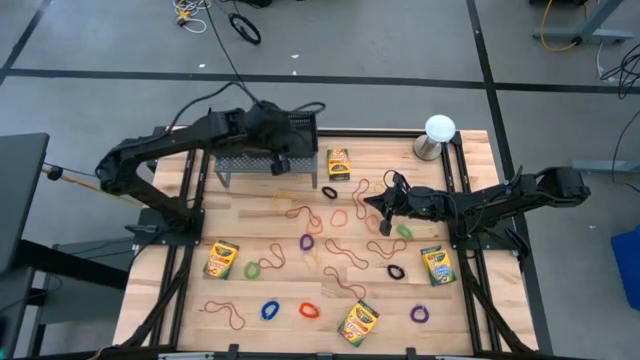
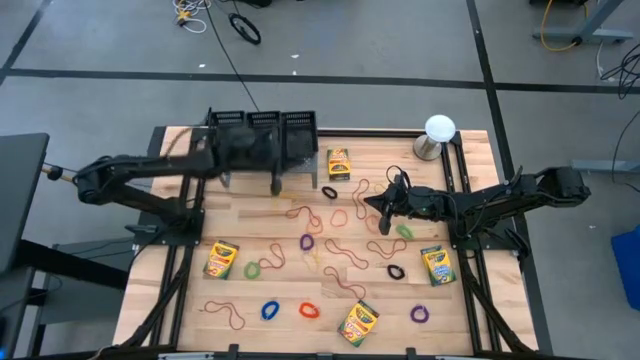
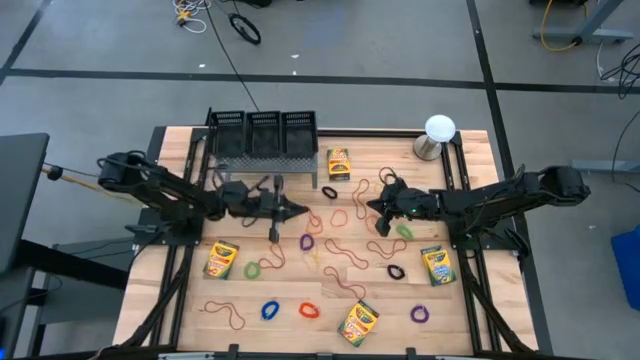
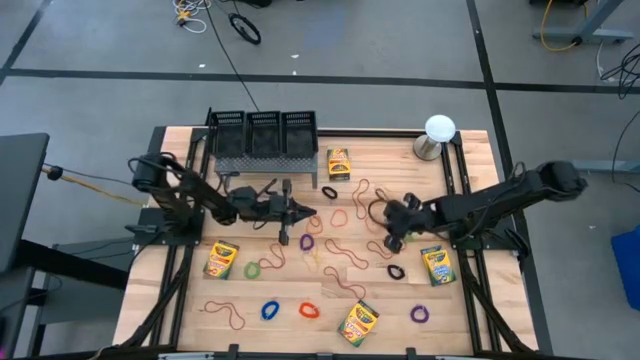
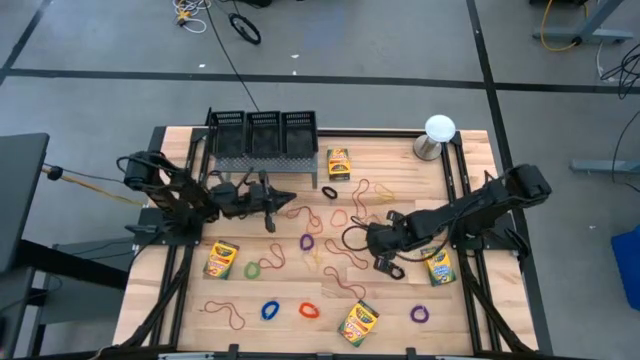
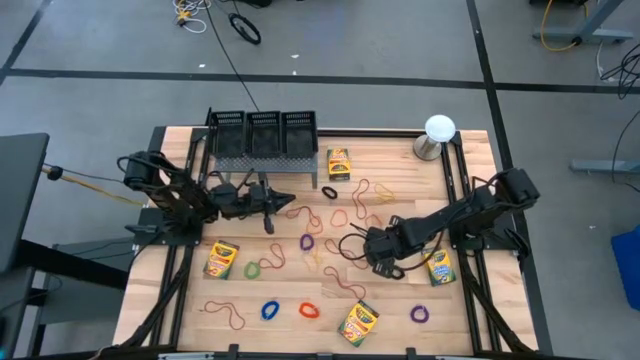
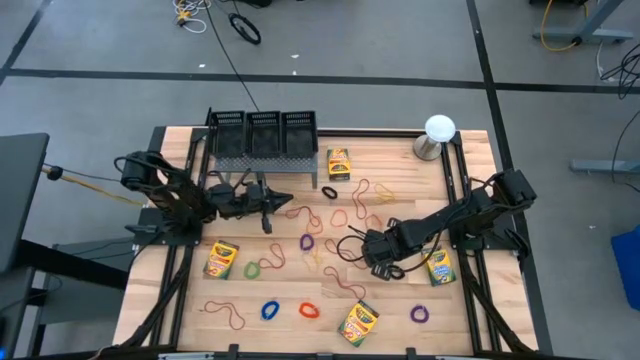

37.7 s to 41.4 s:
Task: Pick & Place Office Desk Supplies
Put the red rubber band into the right black bin

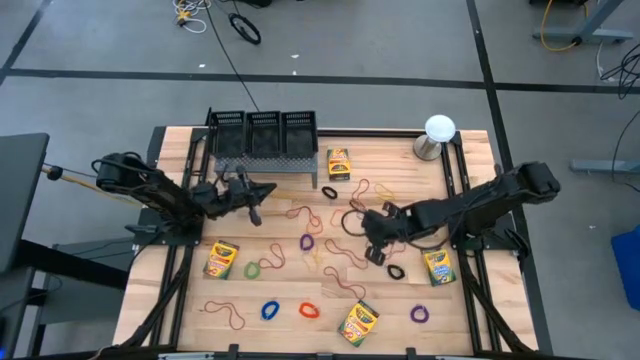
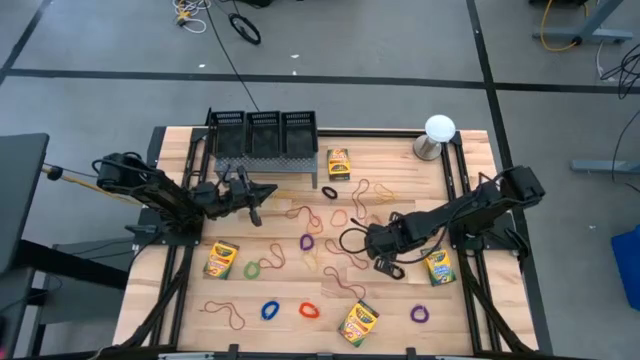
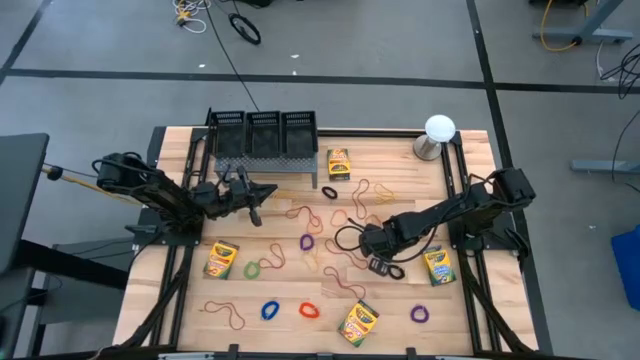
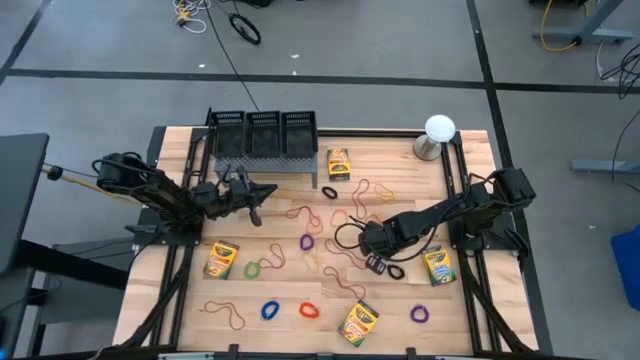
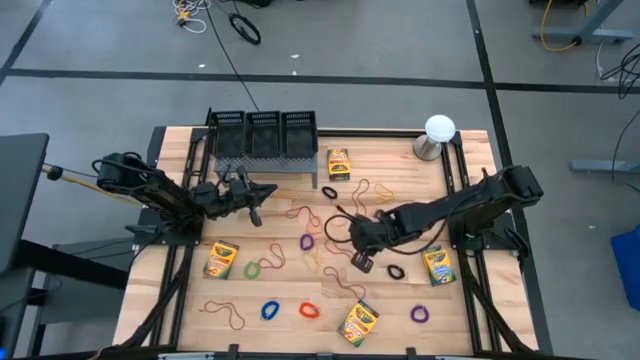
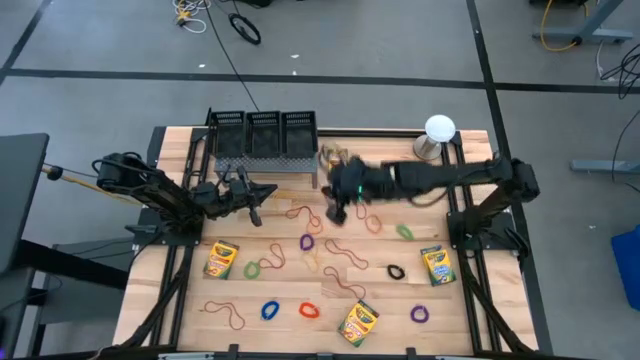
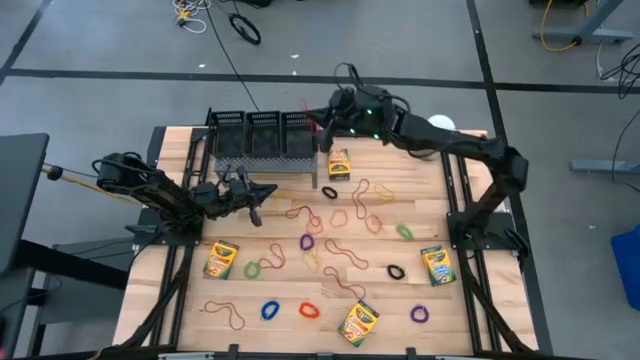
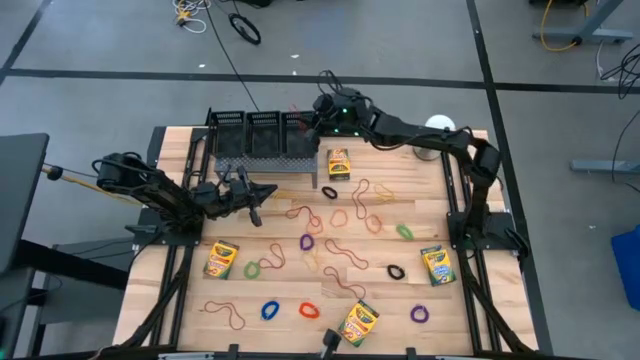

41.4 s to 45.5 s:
Put the red rubber band into the right black bin

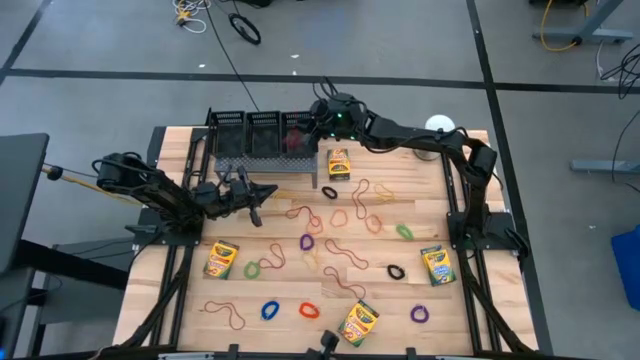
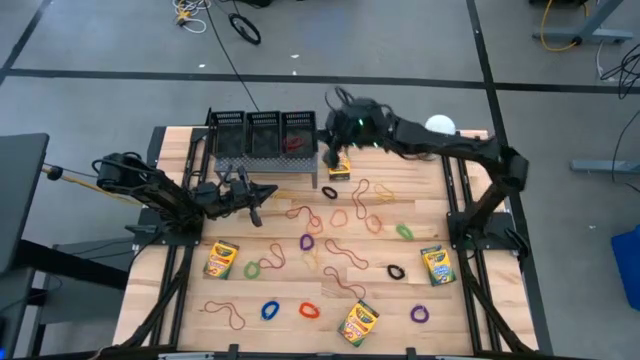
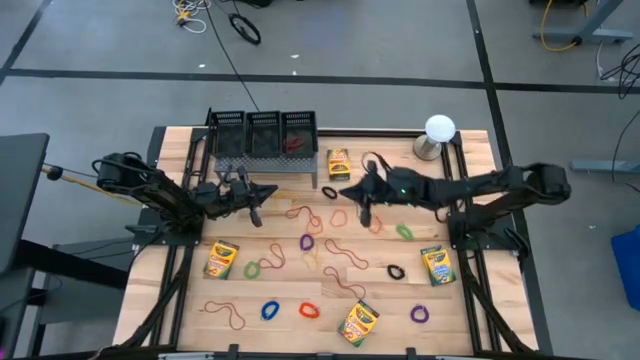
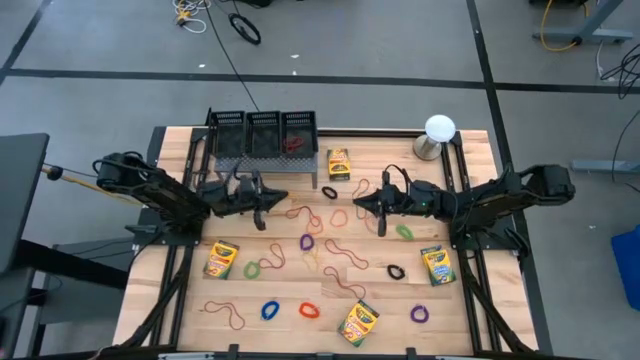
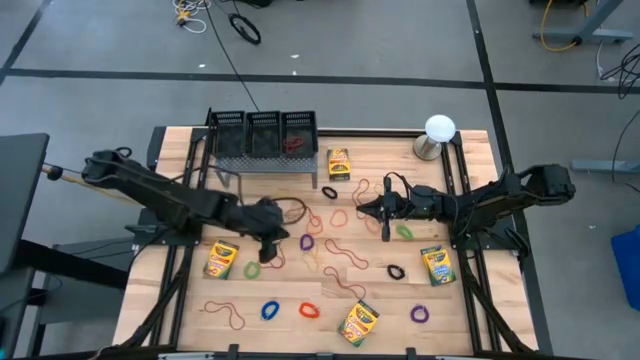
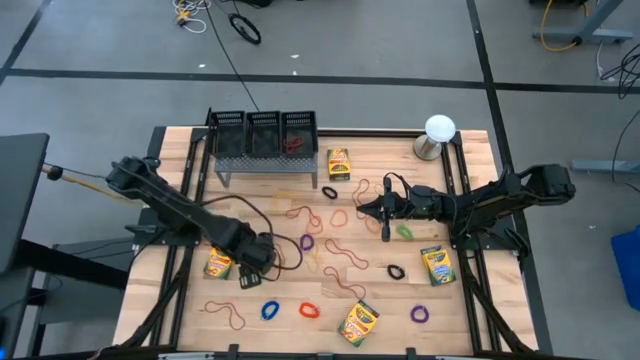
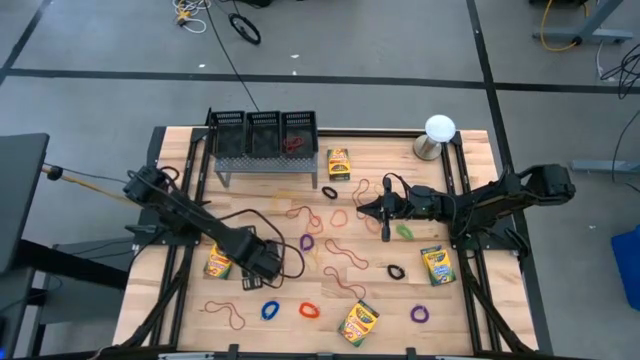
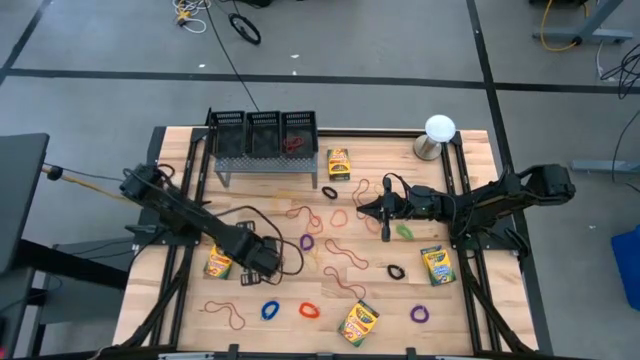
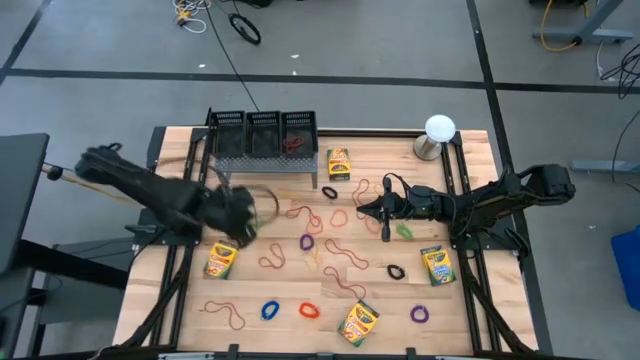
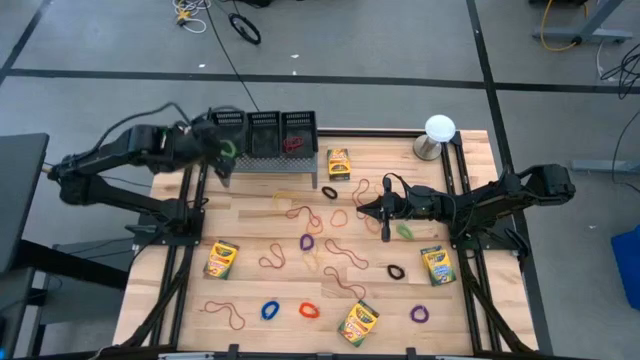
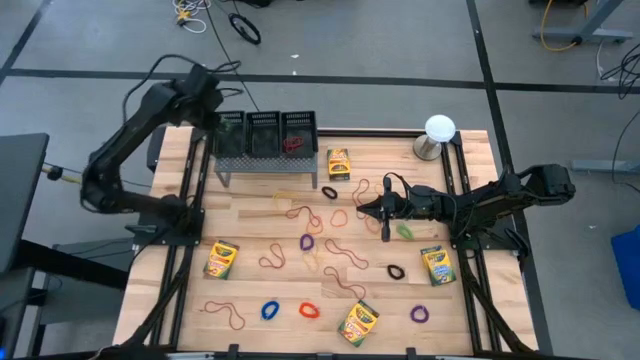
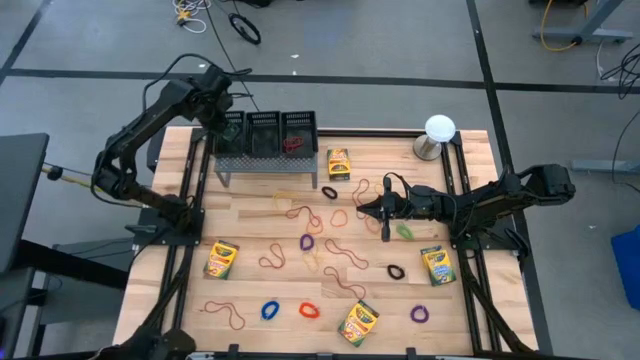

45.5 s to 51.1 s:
Put the left green spiral keychain into the left black bin

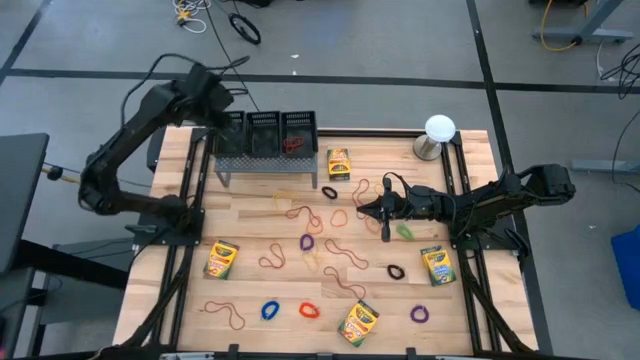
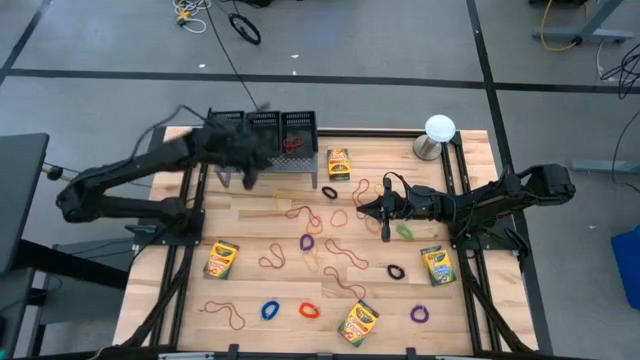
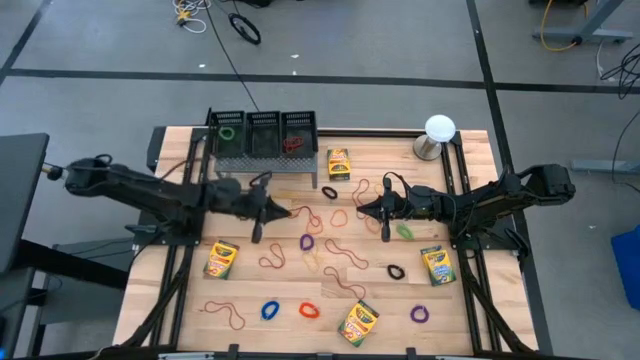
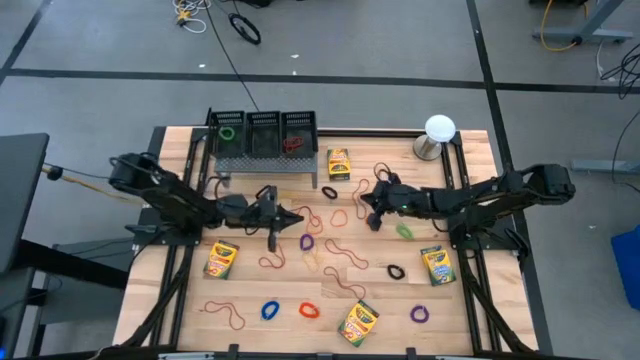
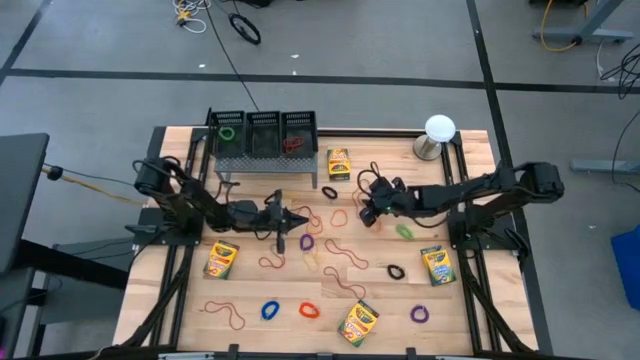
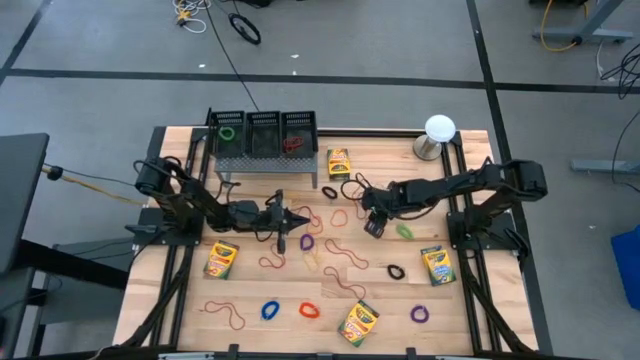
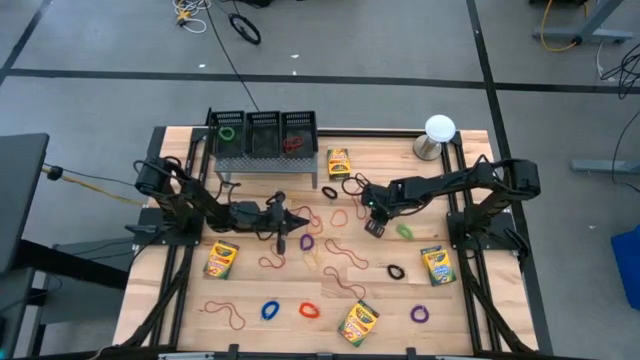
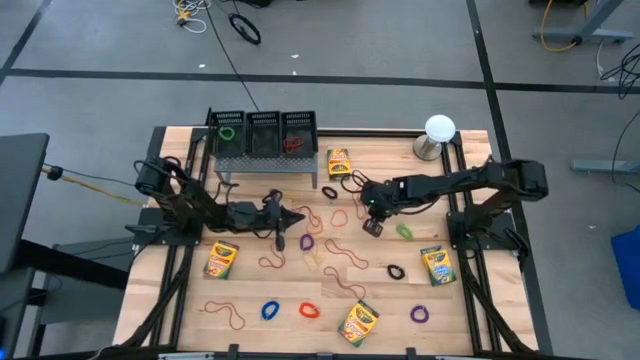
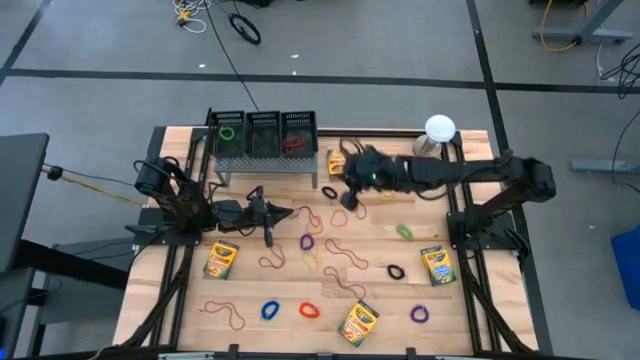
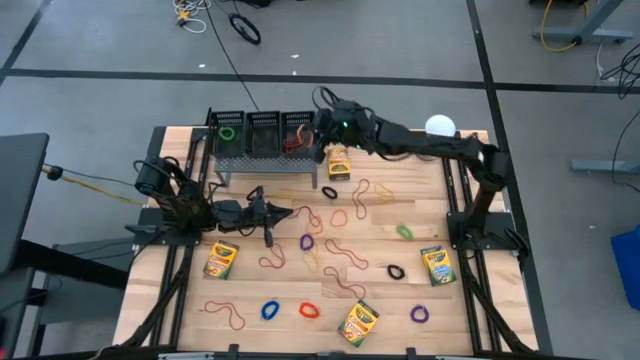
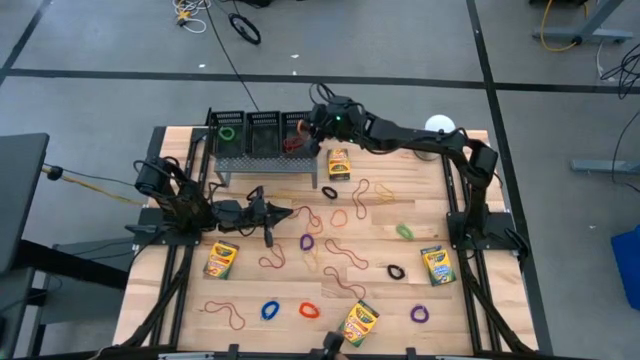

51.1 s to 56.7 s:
Put the right orange rubber band into the right black bin
